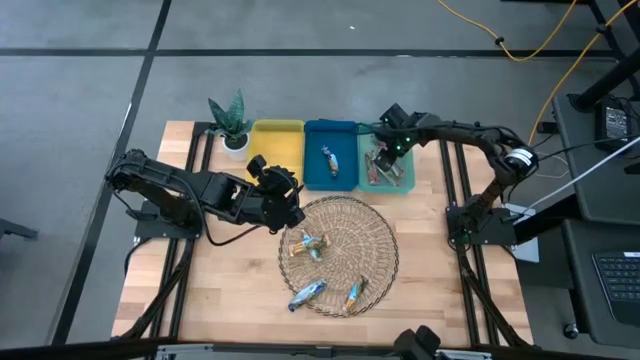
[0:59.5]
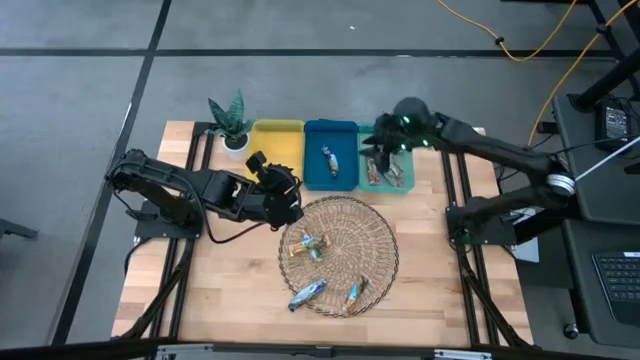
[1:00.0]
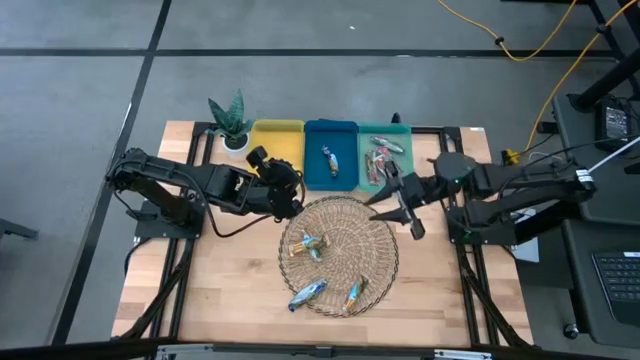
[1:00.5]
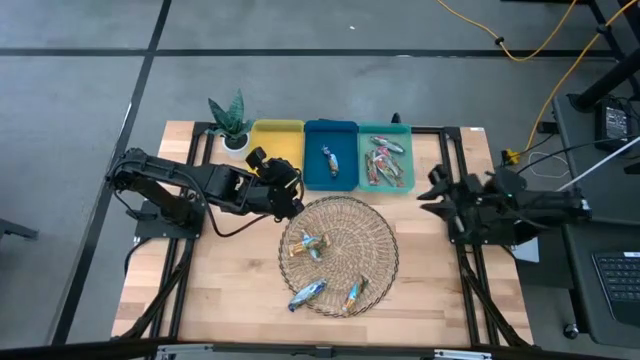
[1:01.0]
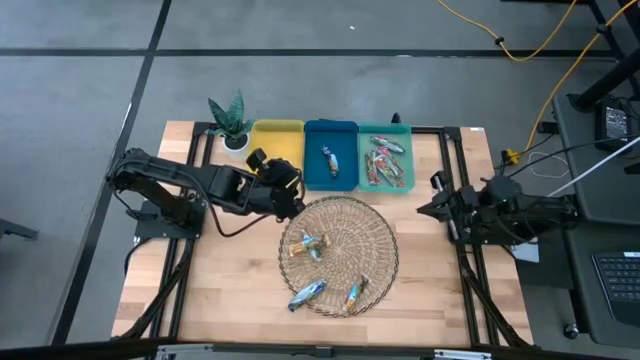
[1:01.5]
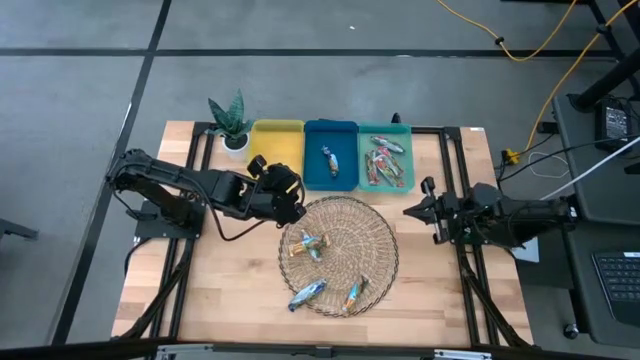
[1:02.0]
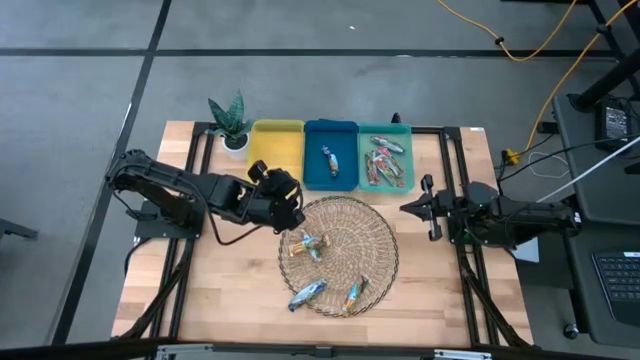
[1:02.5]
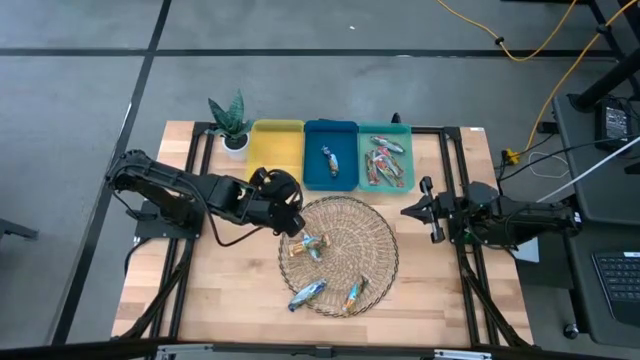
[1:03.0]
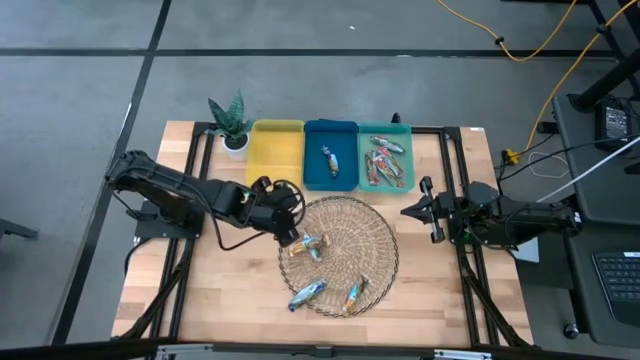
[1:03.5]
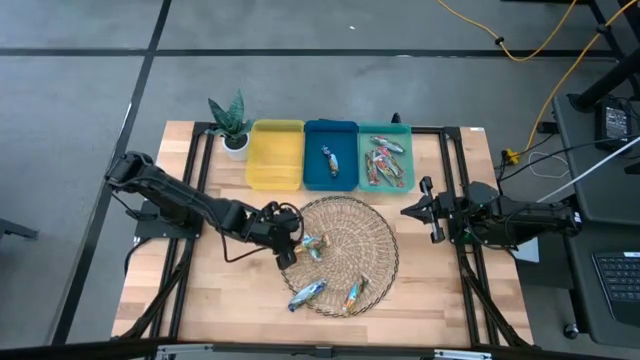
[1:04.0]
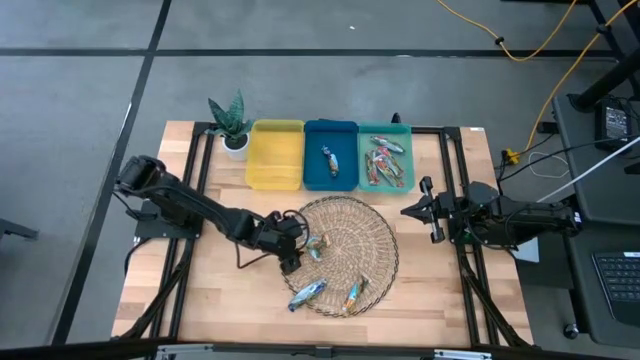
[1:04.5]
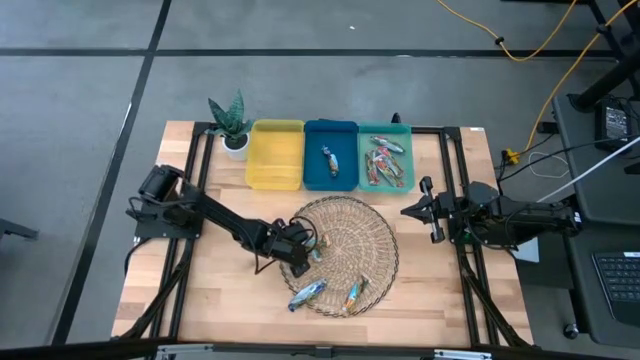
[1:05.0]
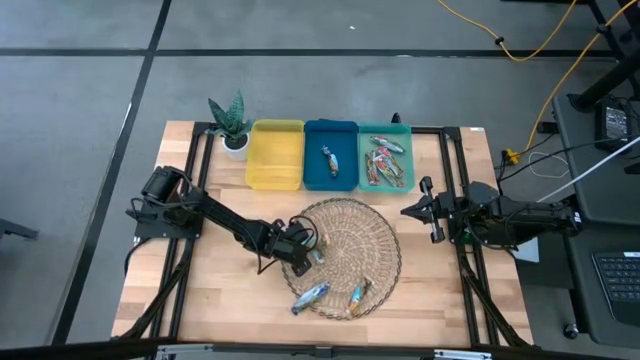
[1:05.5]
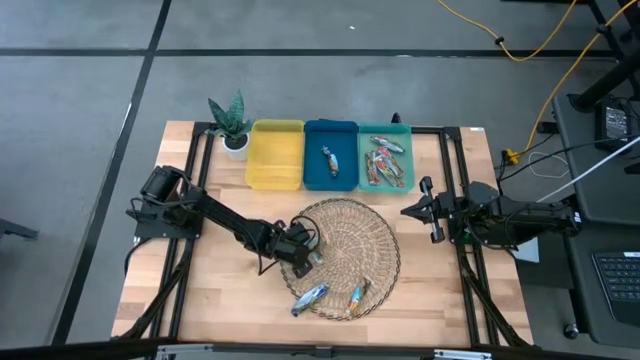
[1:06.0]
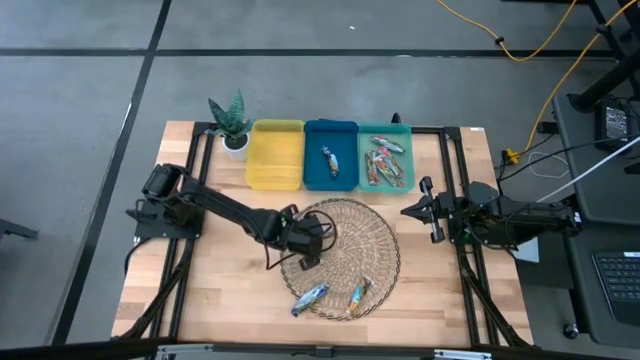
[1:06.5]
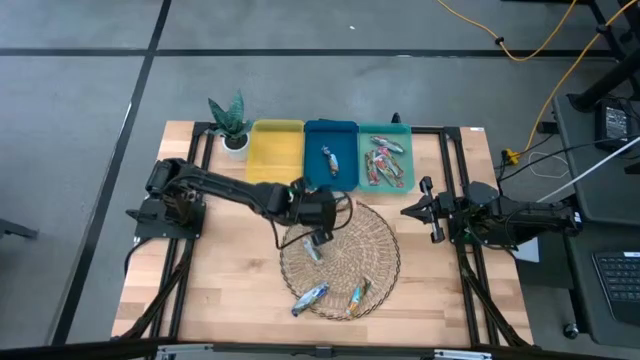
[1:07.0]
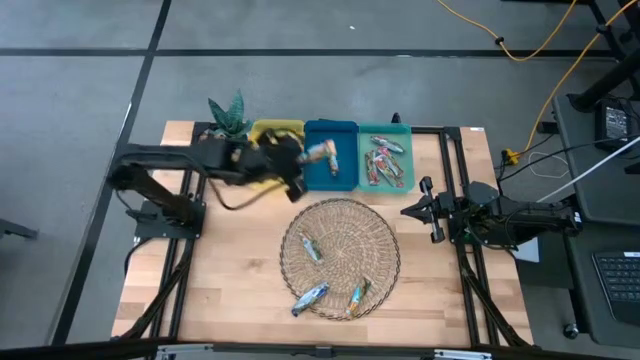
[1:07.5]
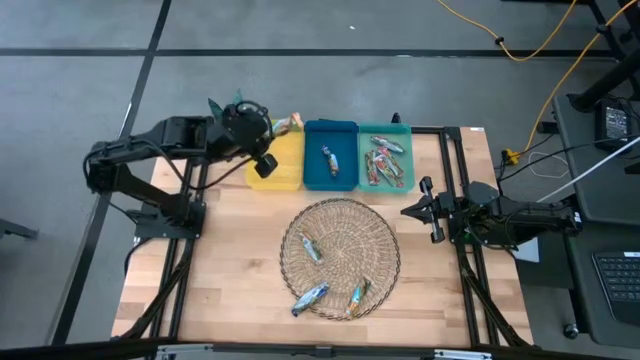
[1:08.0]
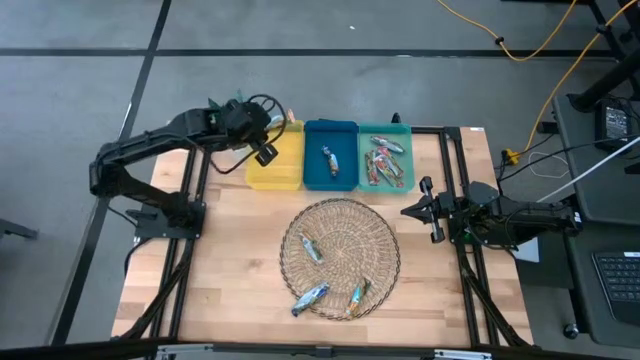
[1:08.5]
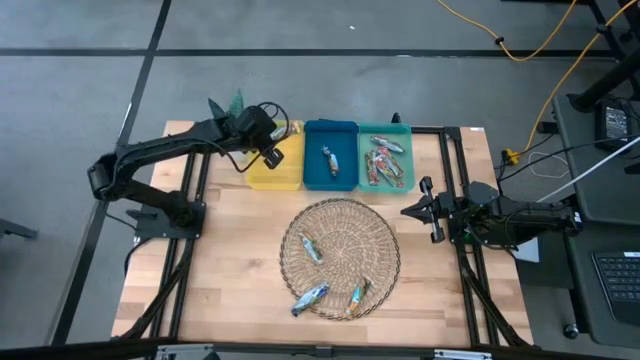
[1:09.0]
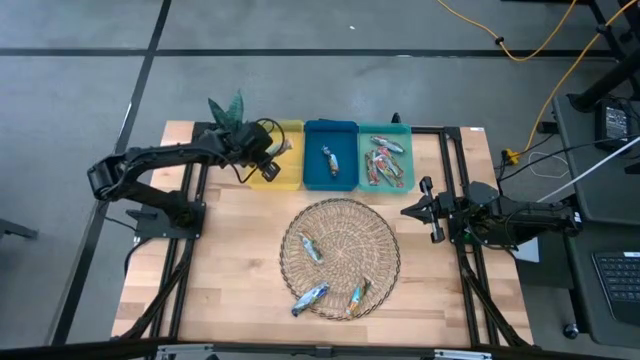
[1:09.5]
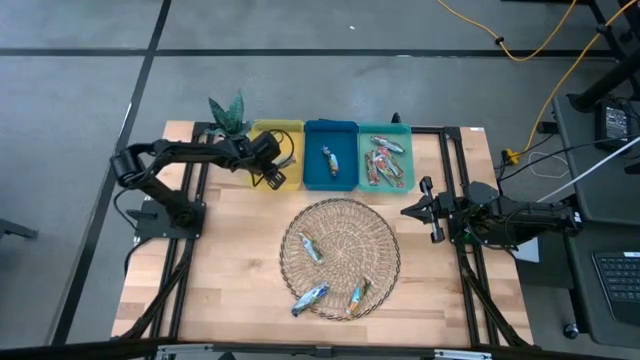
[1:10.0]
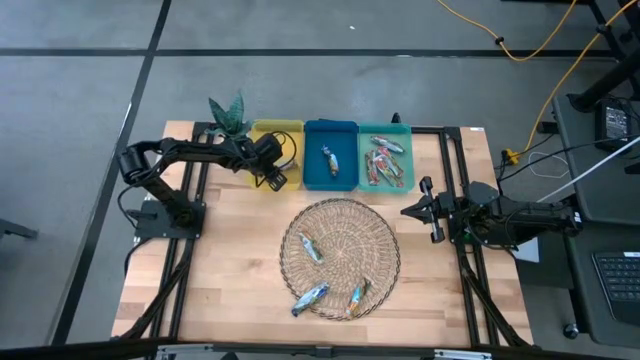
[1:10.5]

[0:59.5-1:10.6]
Task: Pick and place Granola Bars by type
Put the yellow granola bar into the yellow bin

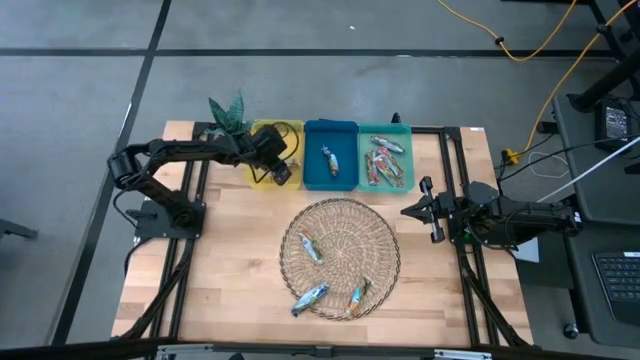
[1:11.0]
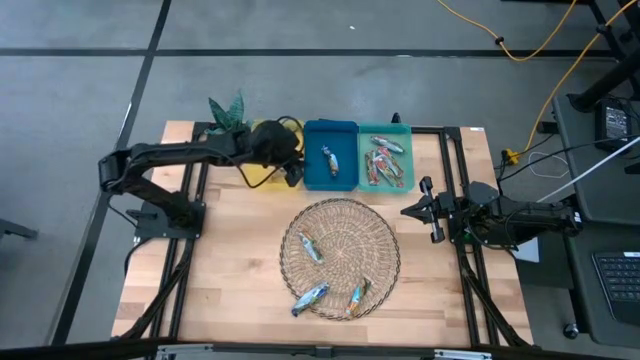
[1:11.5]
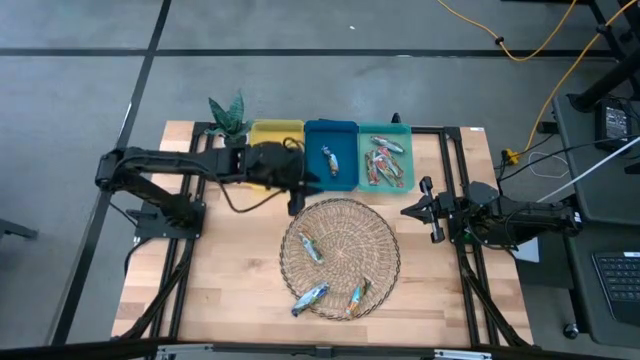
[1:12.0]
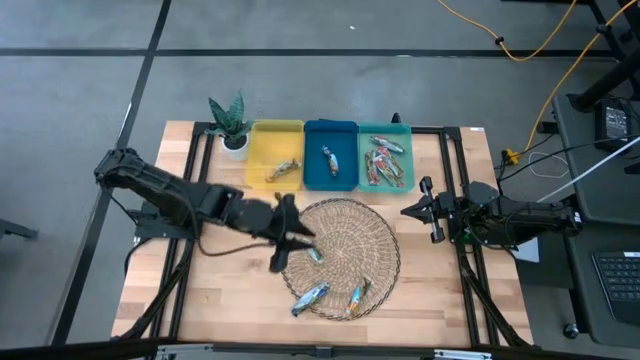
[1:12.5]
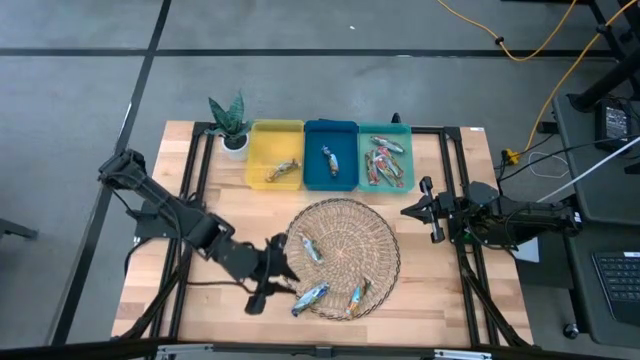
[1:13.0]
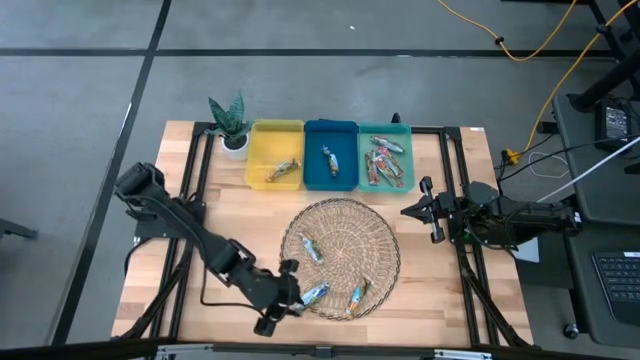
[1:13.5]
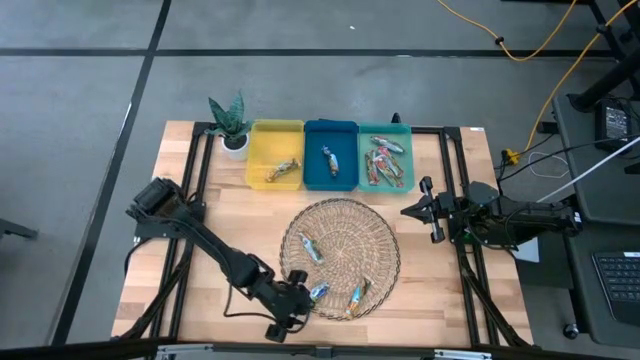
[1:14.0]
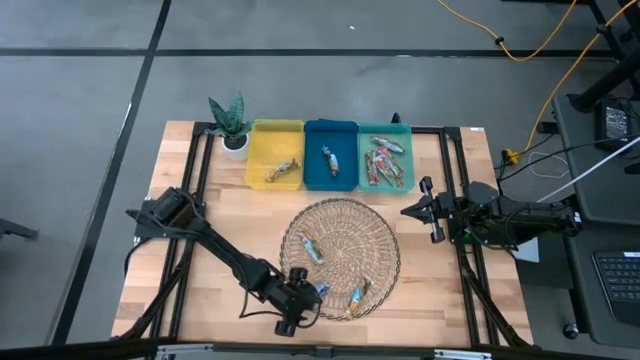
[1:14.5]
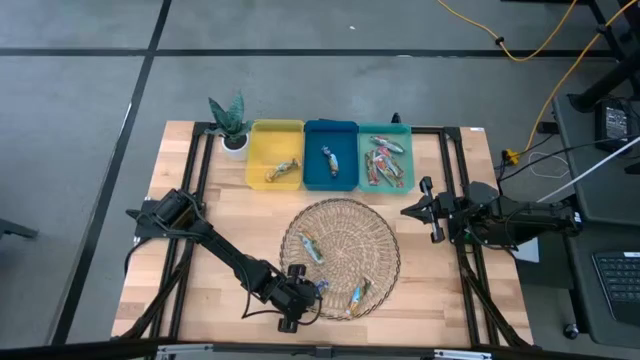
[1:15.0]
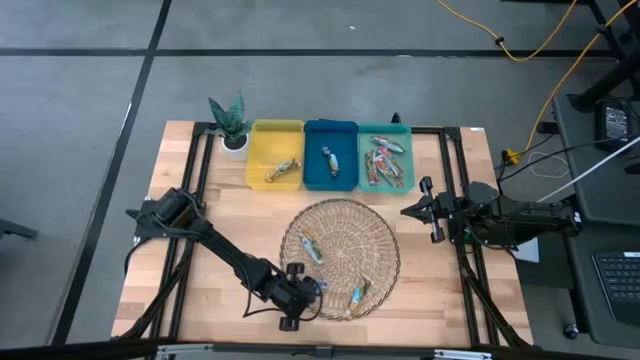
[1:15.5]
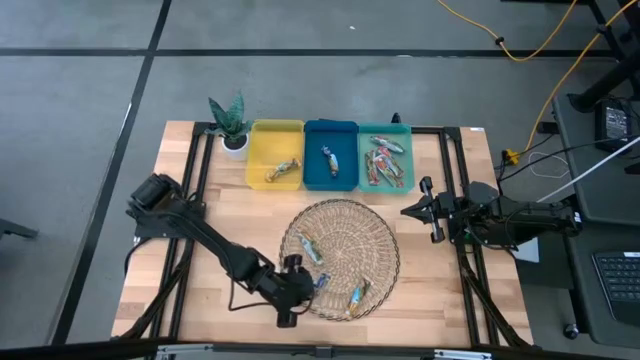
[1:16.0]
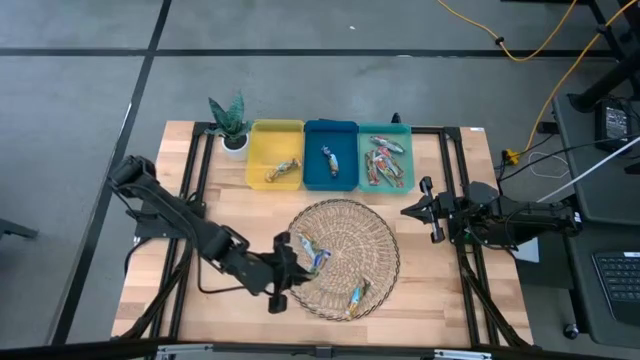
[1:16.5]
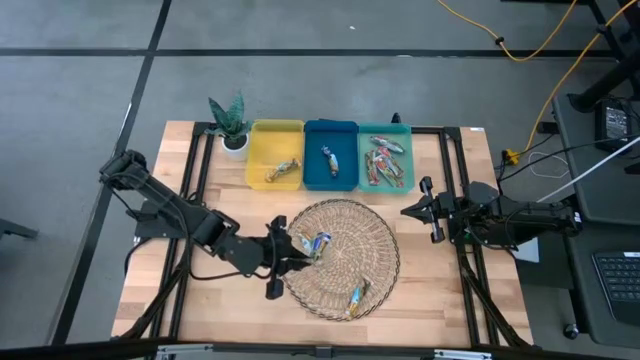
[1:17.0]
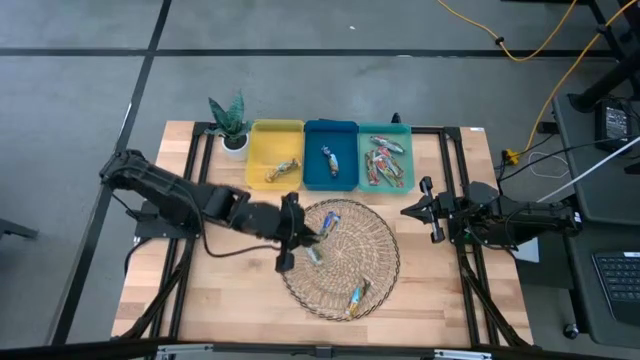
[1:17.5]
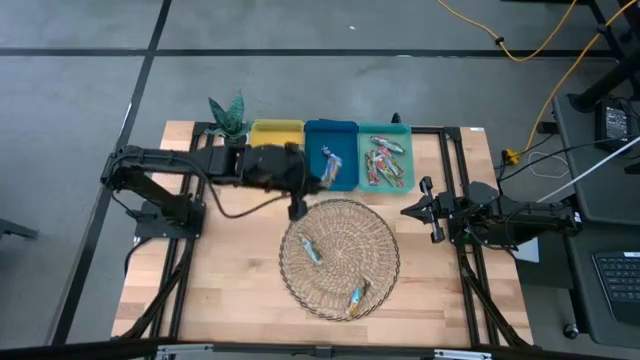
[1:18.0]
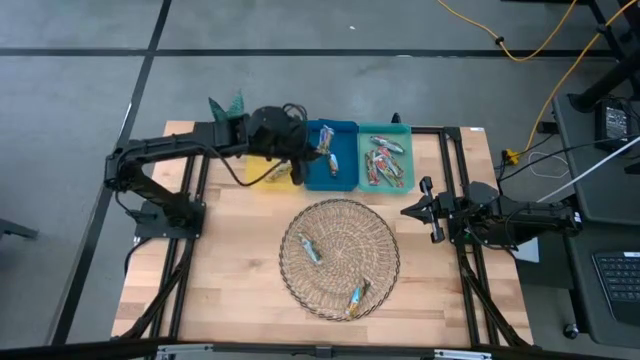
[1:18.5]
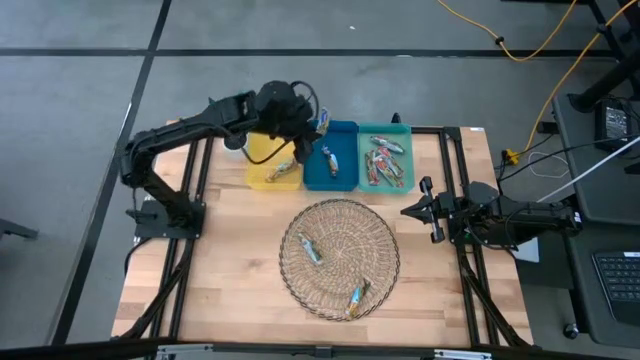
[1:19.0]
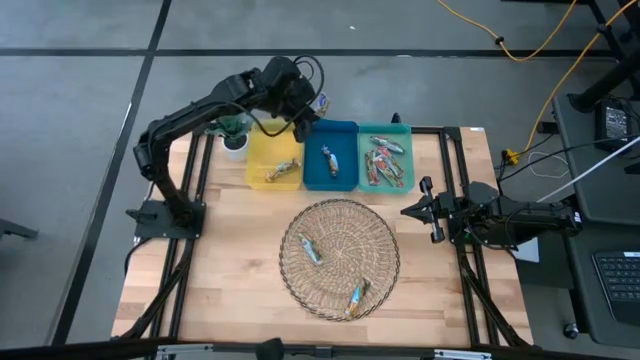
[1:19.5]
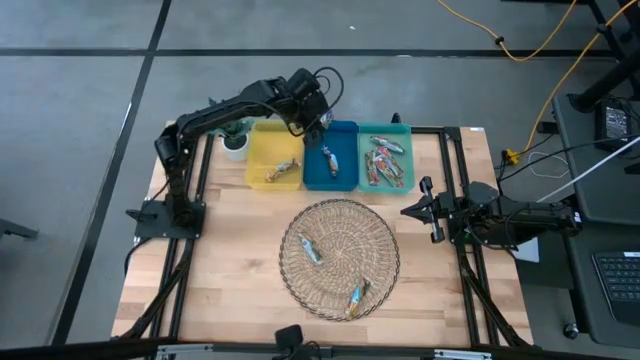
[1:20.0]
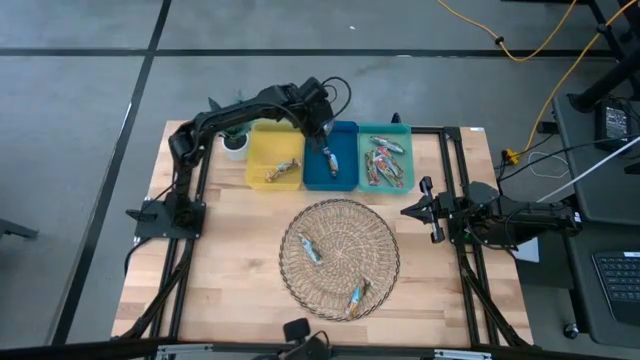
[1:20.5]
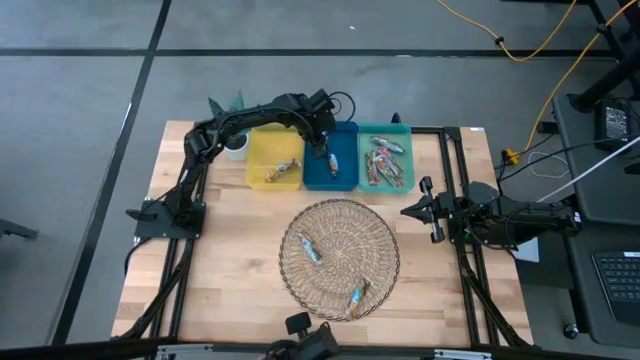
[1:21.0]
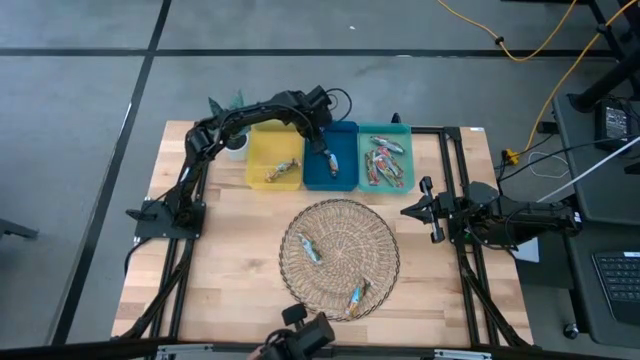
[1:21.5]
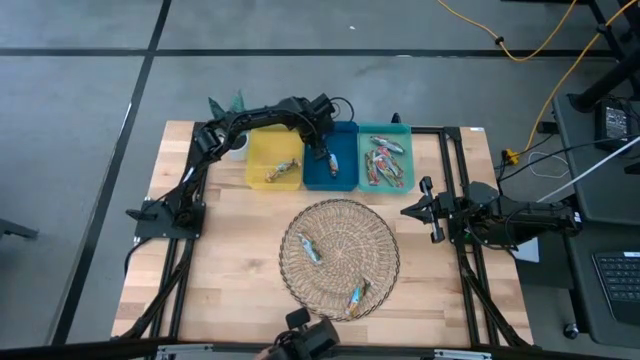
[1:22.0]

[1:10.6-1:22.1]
Put the blue granola bar into the blue bin
